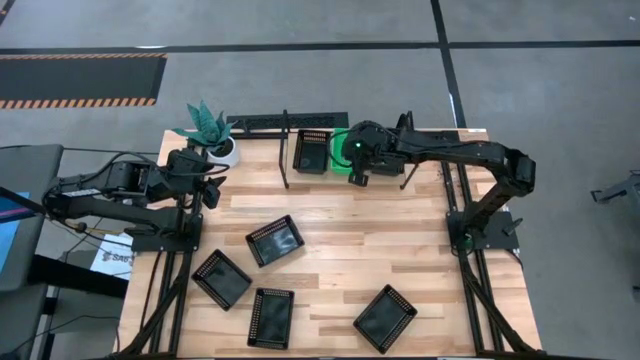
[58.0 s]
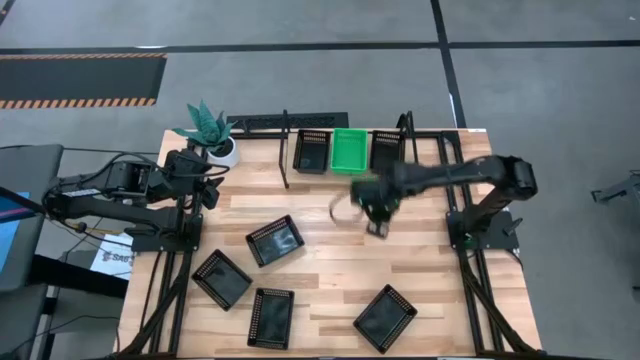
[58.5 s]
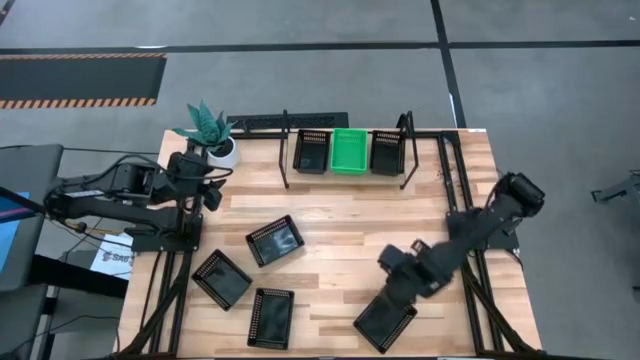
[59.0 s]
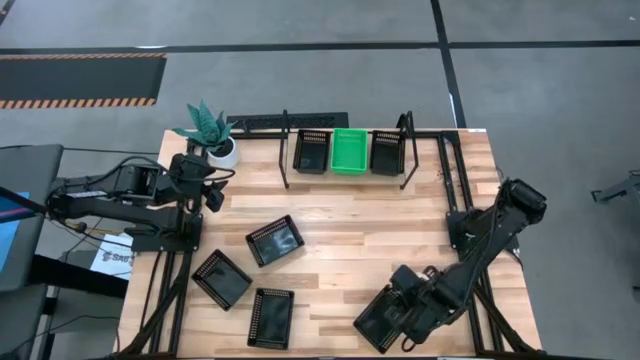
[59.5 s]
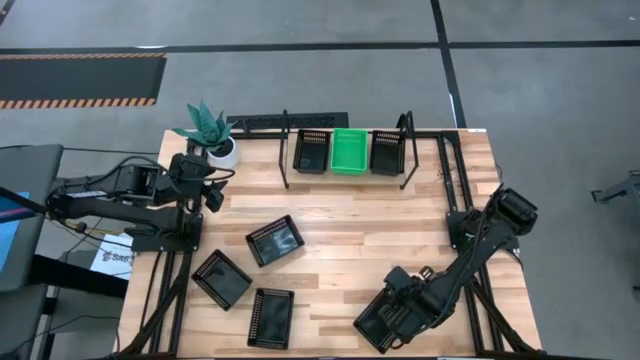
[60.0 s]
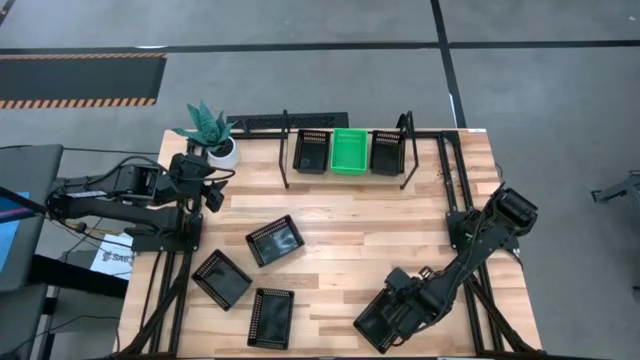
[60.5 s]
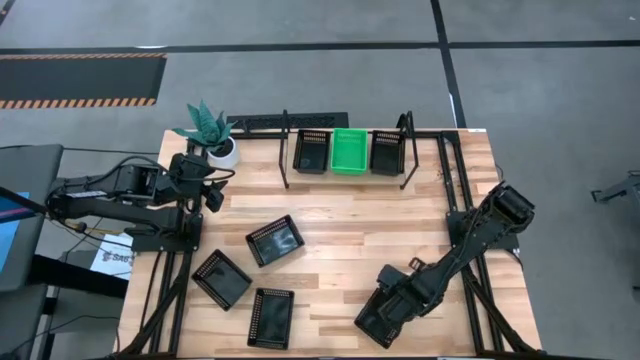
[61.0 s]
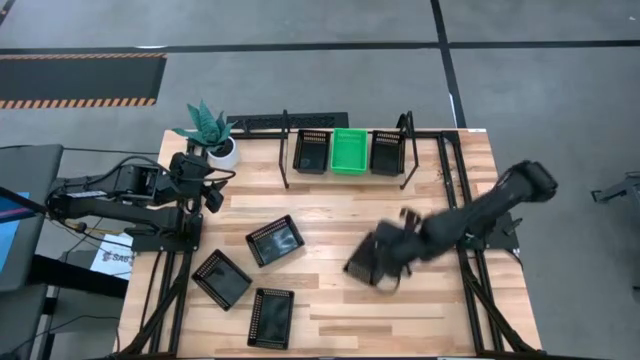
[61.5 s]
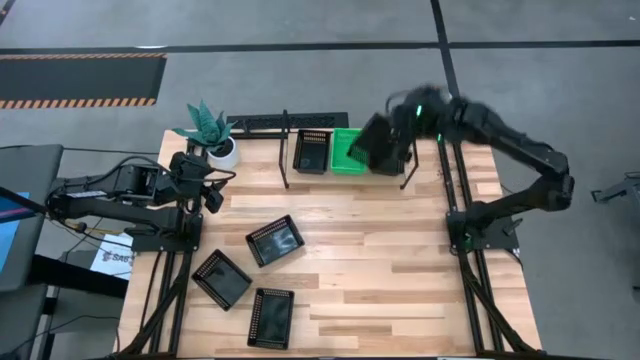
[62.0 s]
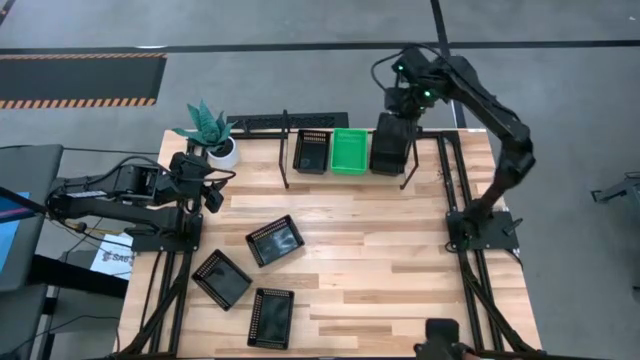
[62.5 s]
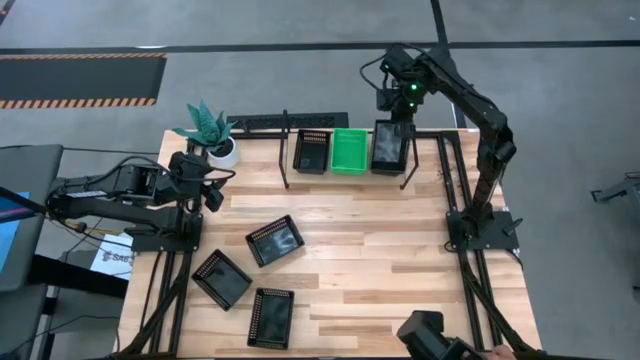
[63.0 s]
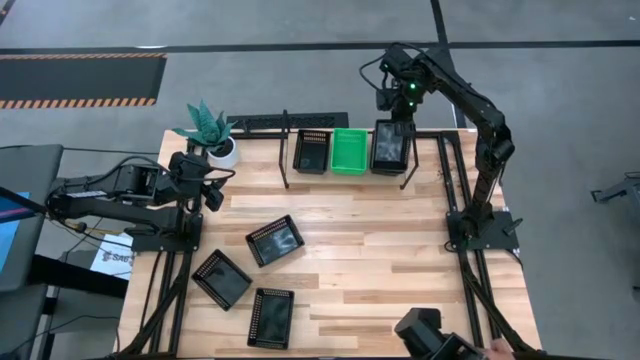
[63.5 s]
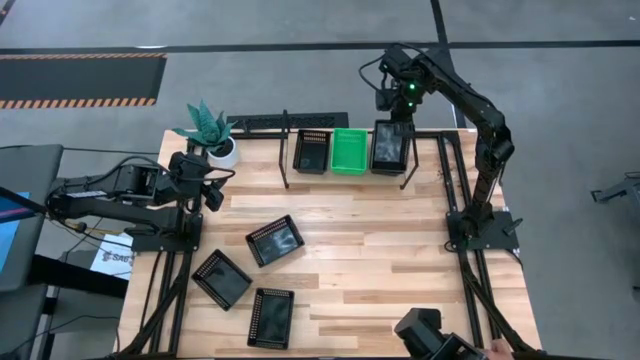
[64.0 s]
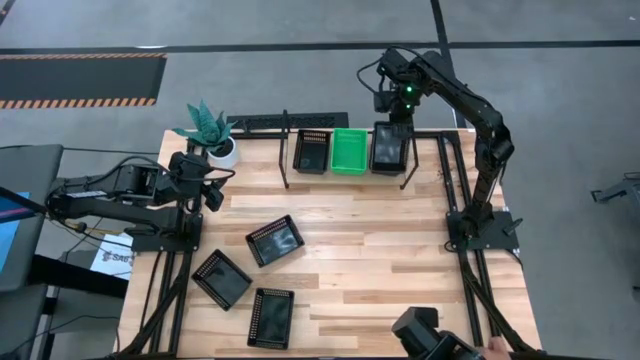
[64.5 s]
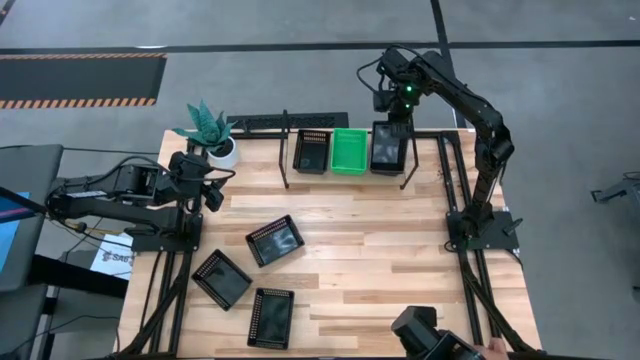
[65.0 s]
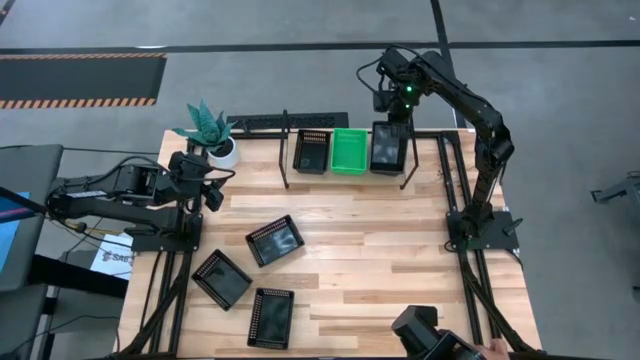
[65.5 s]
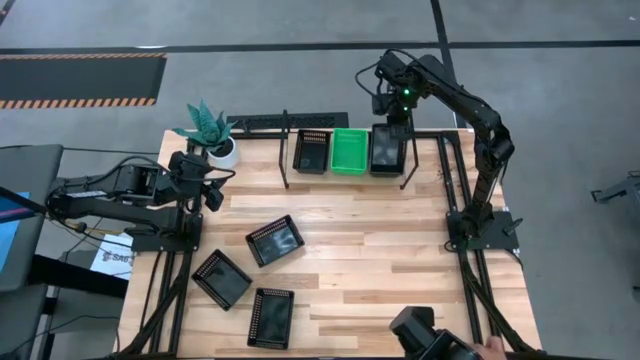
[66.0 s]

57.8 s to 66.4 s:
Task: Stack baskets on shelf by color
Stack the black basket on top of the black basket on the shelf

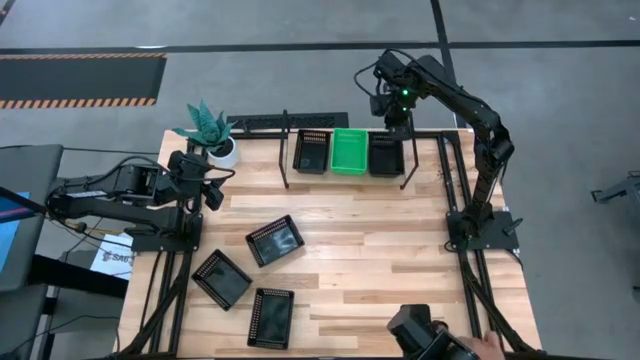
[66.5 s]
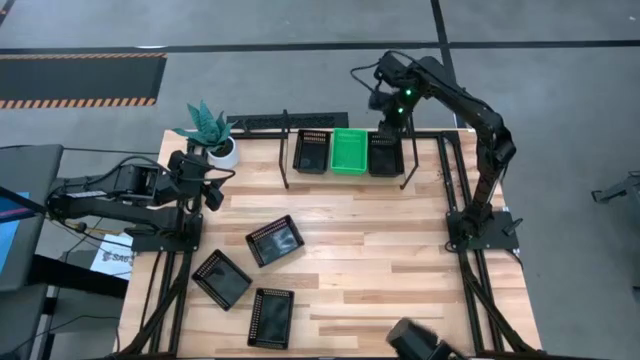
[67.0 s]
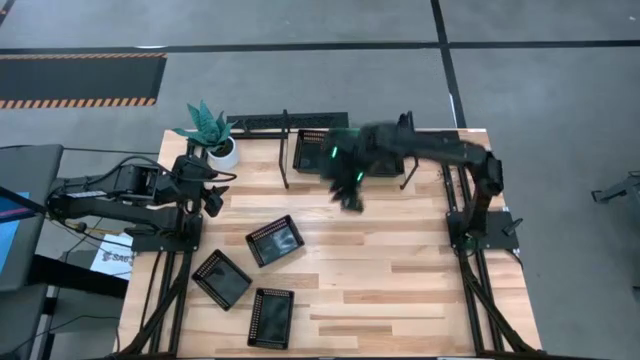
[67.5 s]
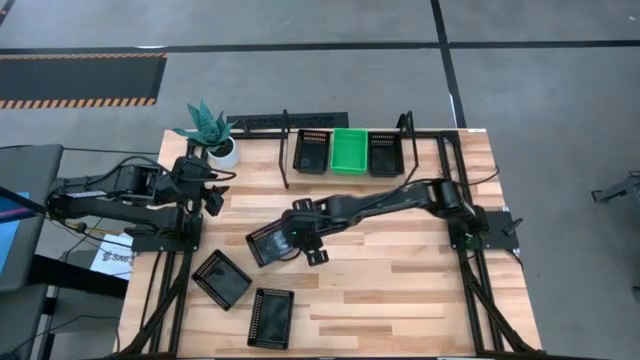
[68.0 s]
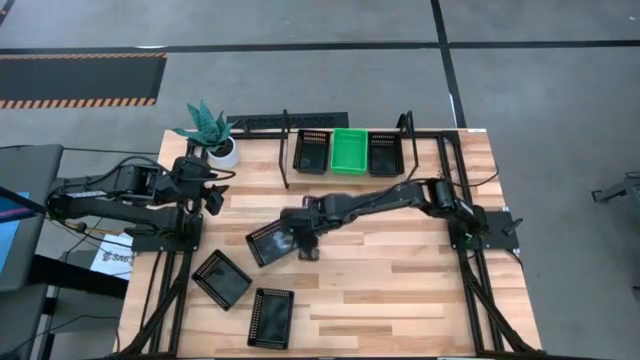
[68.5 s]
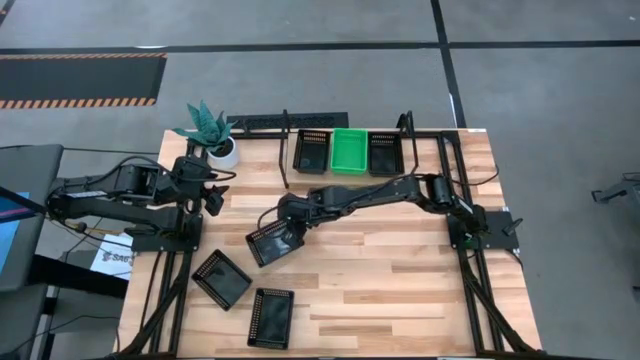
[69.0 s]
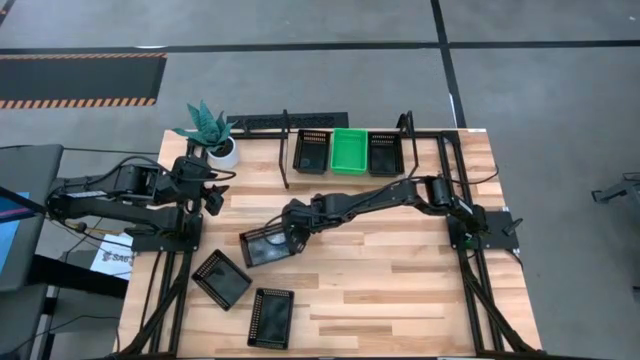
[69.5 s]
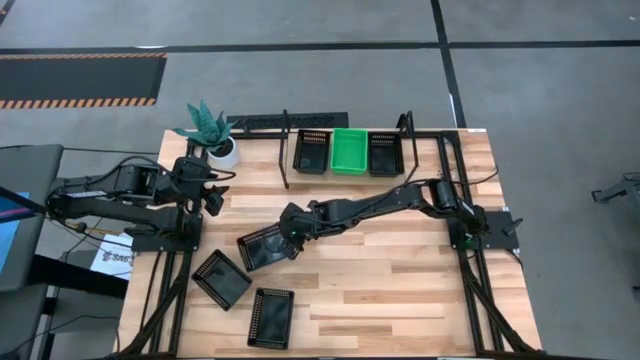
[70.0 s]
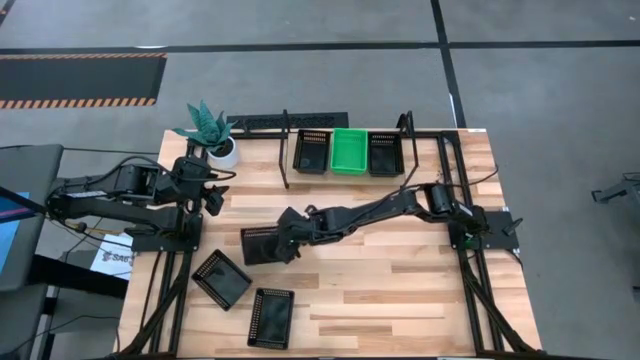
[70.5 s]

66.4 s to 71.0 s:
Stack the black basket on top of the black basket on the shelf

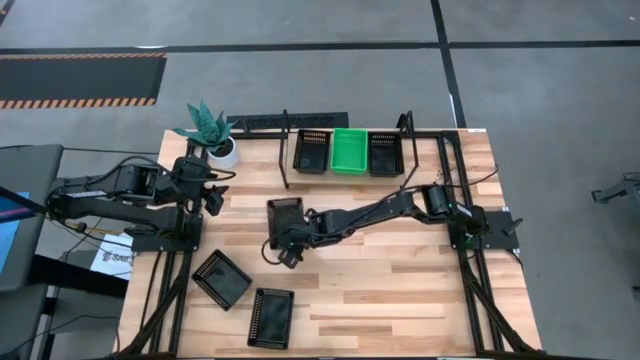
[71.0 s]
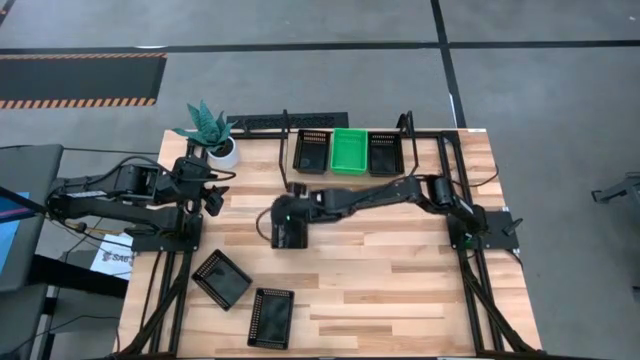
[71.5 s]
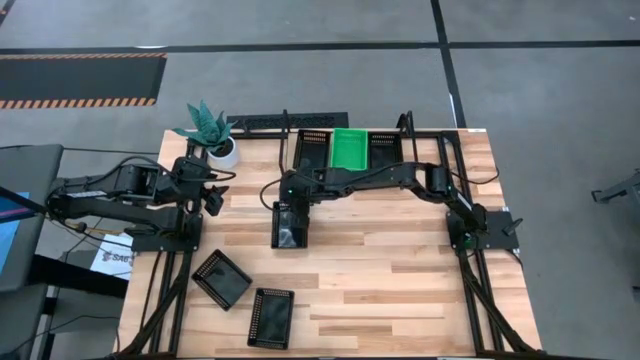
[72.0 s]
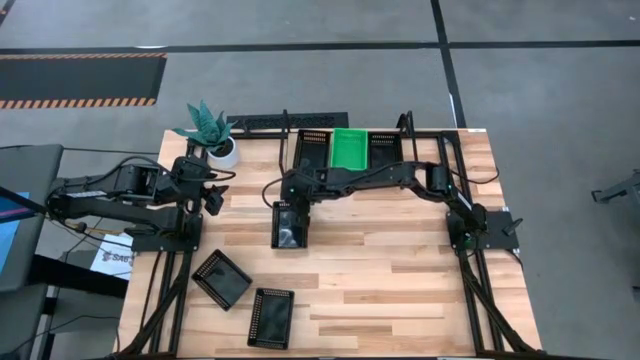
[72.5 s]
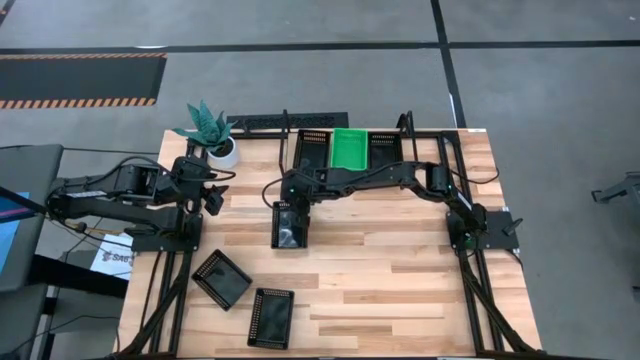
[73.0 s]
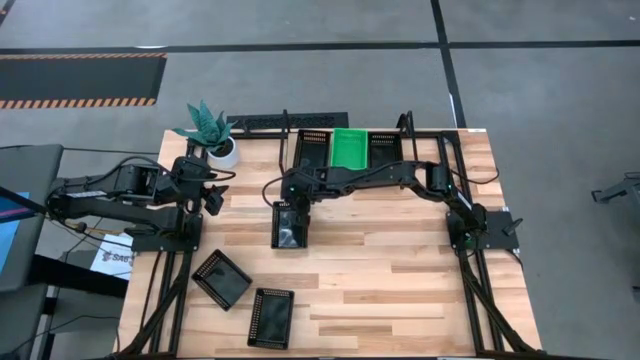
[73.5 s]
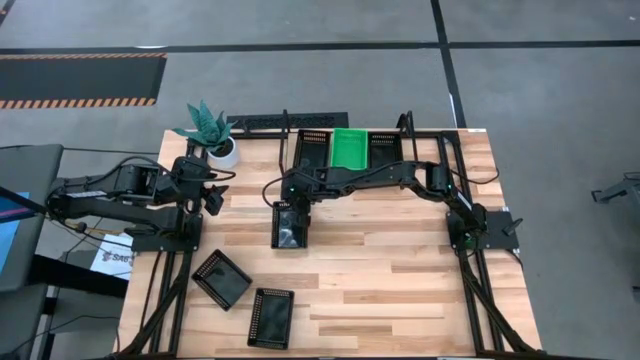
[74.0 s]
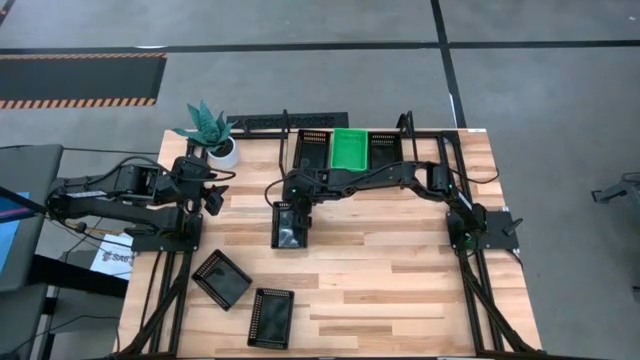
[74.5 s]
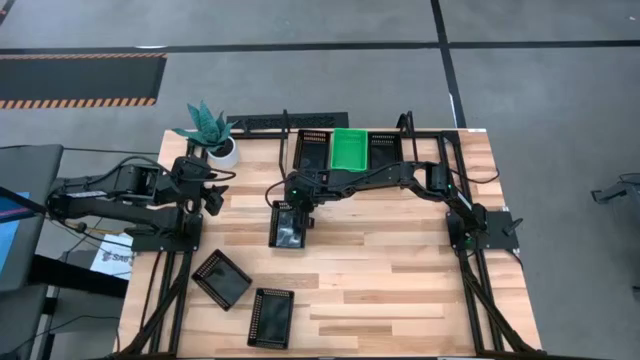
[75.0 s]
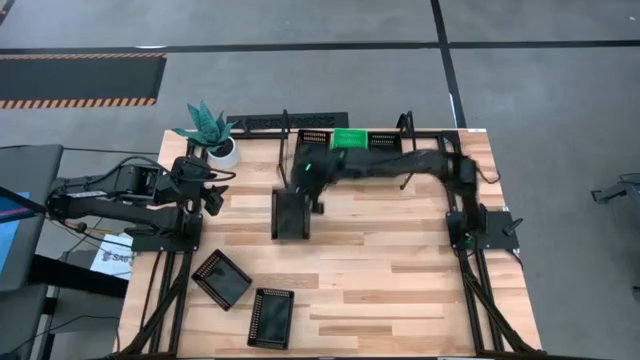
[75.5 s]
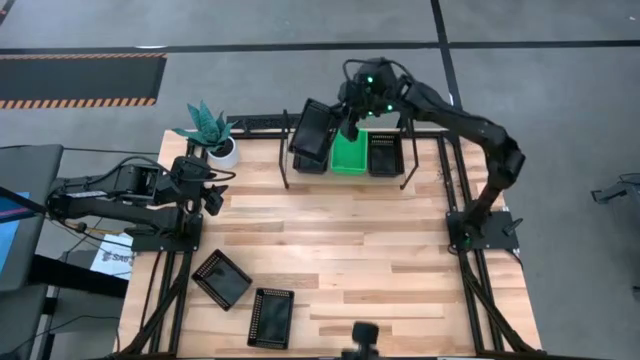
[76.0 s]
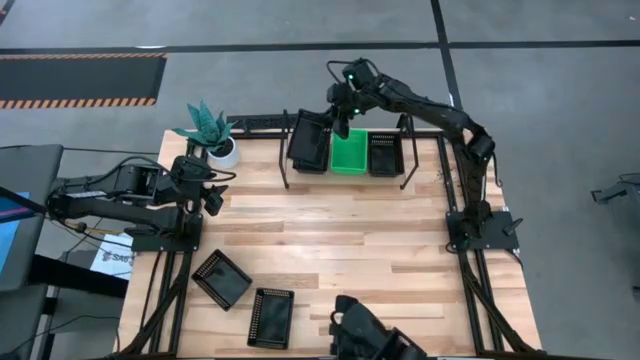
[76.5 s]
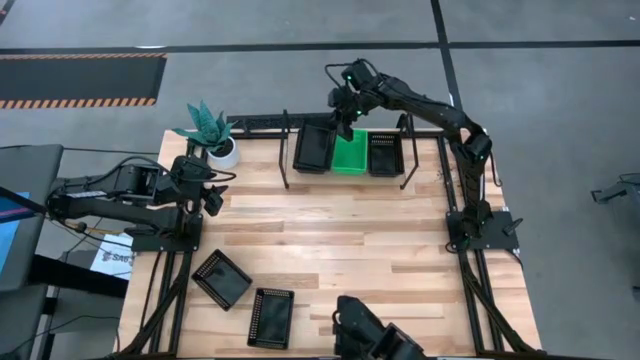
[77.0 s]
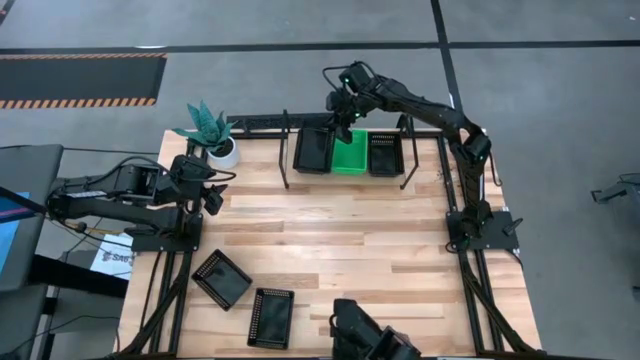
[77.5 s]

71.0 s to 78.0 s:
Stack the black basket on top of the black basket on the shelf

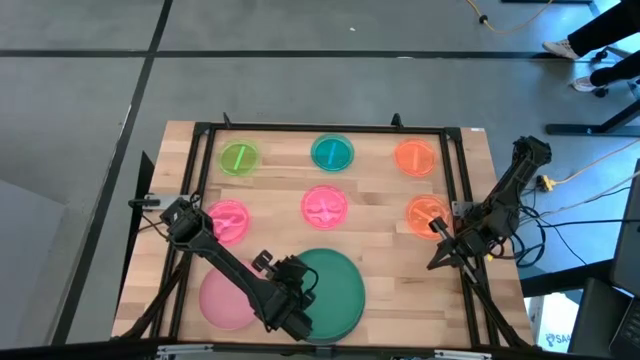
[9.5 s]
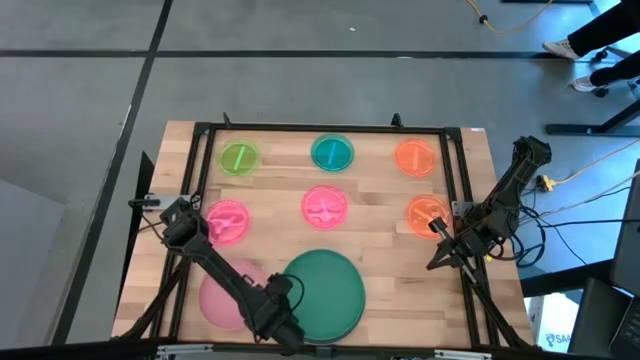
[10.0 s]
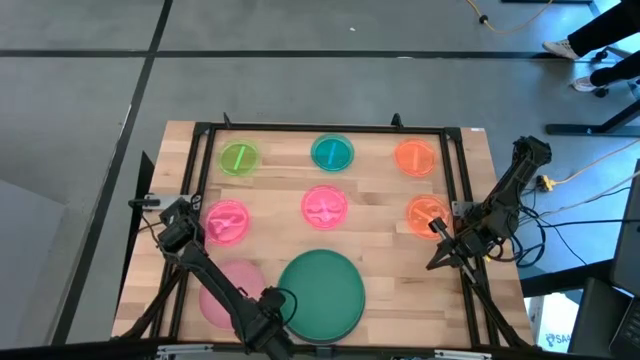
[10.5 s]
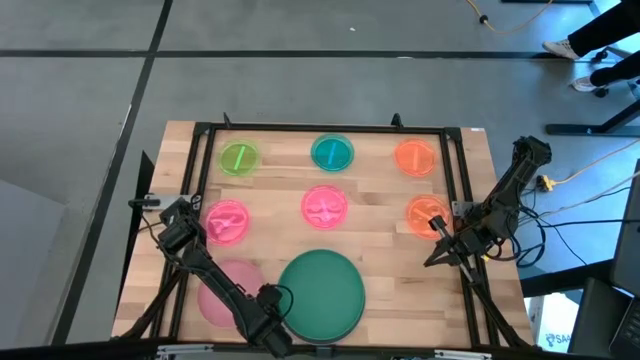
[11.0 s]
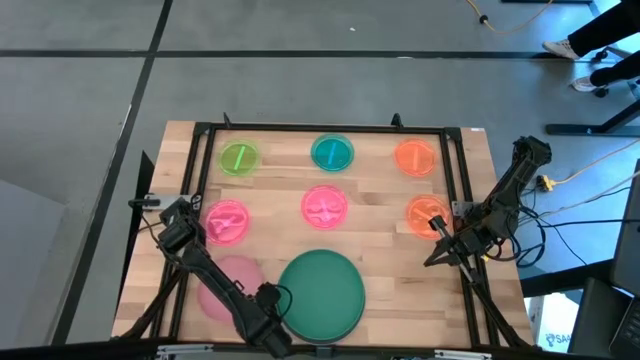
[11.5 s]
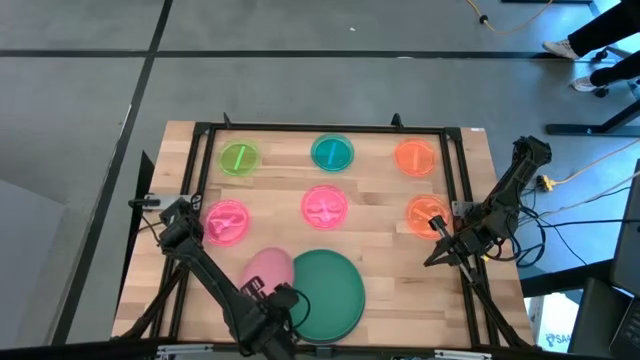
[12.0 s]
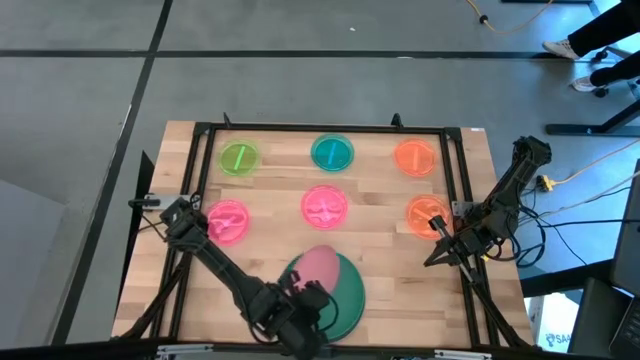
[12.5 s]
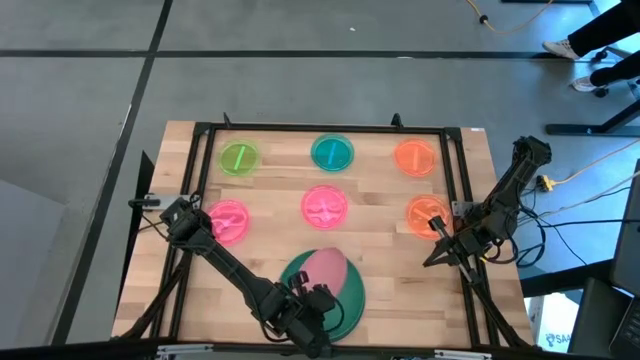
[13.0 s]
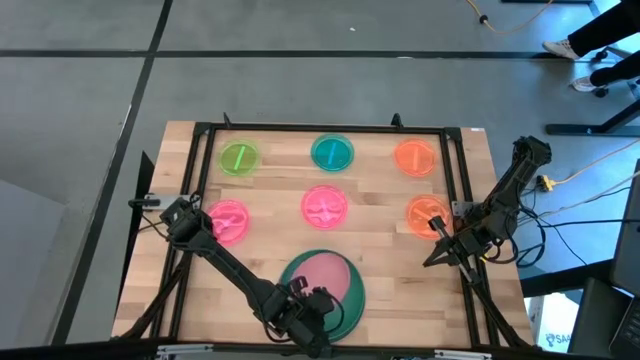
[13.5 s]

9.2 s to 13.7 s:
Task: Stack plastic plates
Stack the pink plate on top of the green plate
